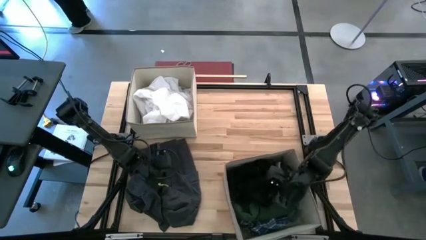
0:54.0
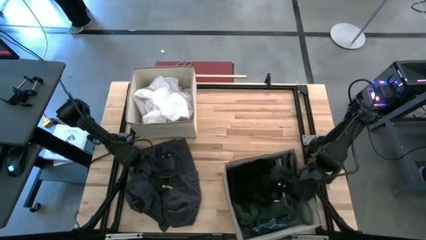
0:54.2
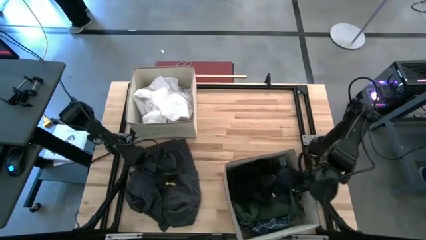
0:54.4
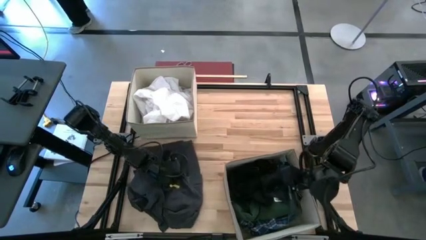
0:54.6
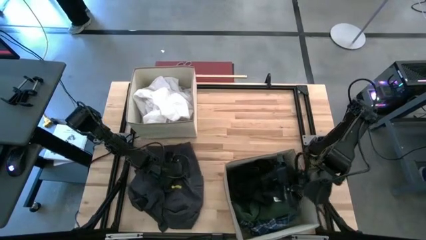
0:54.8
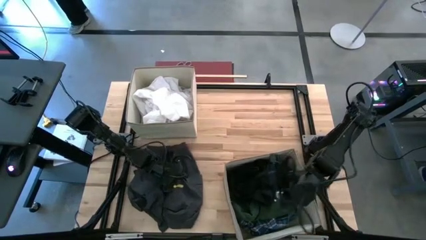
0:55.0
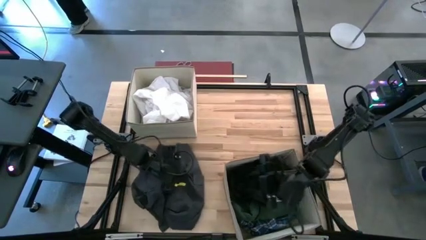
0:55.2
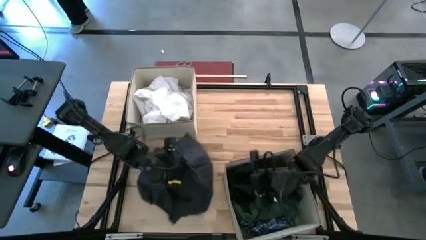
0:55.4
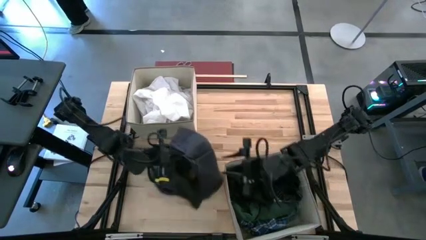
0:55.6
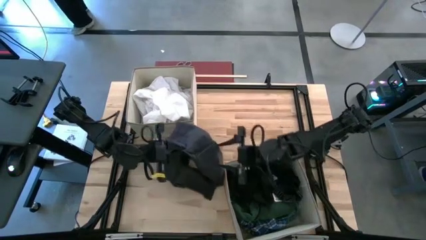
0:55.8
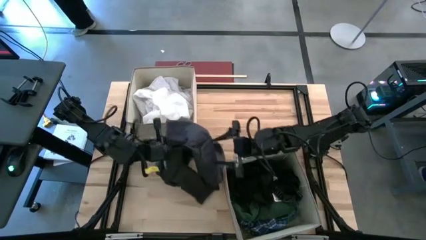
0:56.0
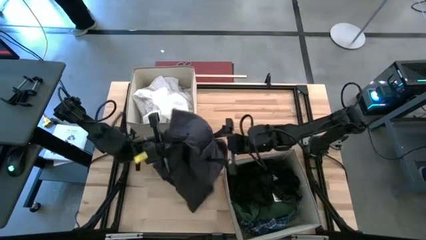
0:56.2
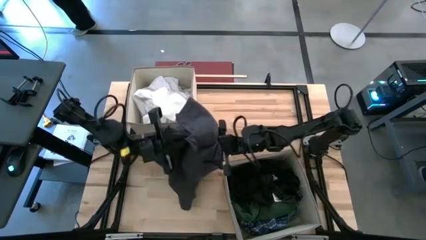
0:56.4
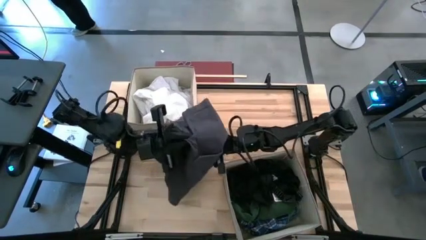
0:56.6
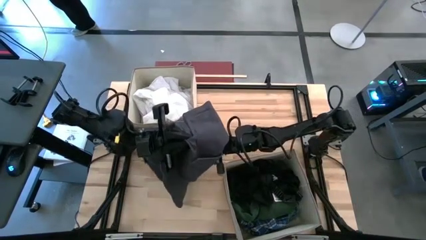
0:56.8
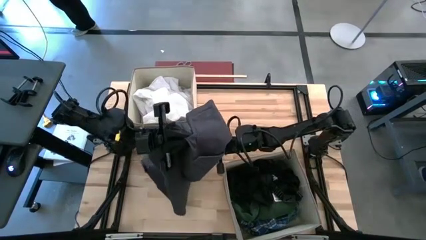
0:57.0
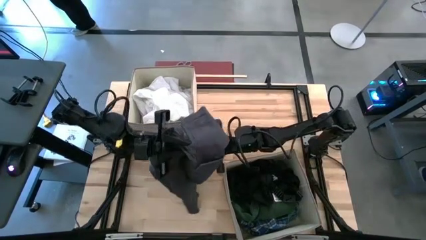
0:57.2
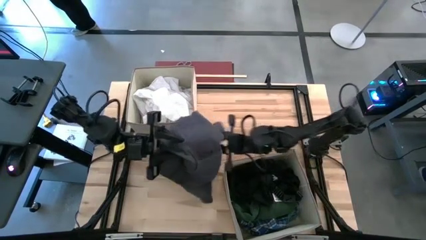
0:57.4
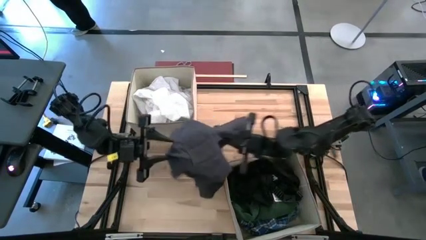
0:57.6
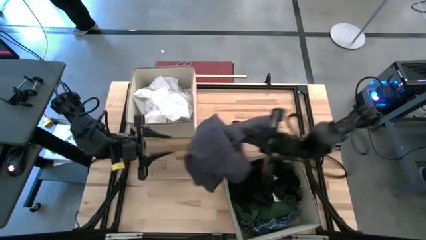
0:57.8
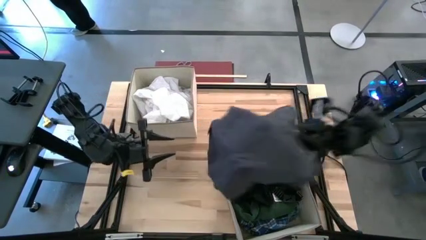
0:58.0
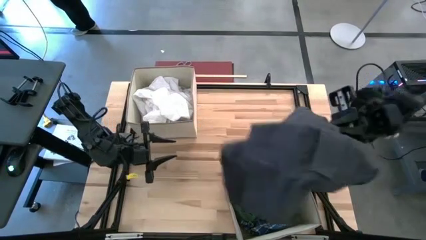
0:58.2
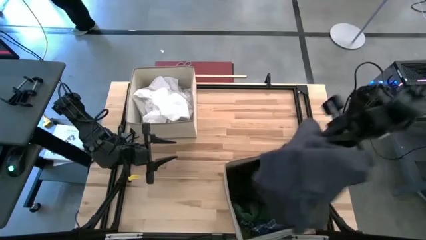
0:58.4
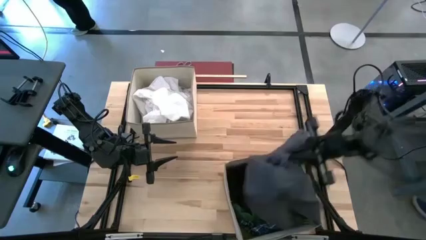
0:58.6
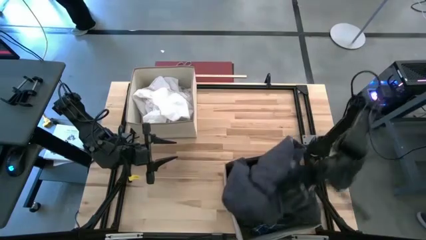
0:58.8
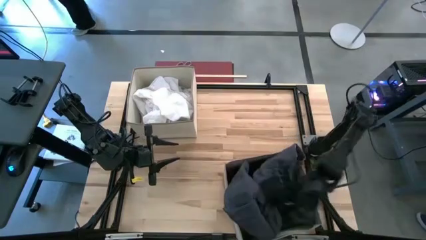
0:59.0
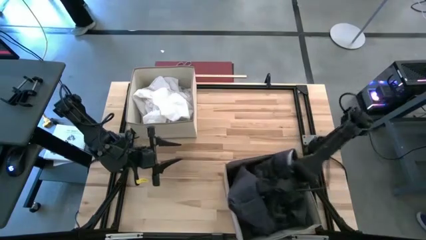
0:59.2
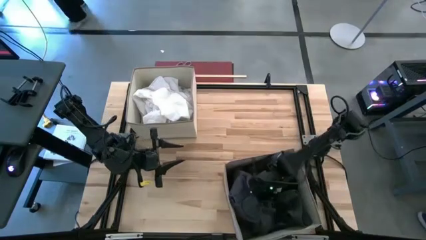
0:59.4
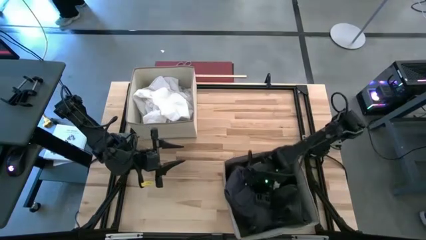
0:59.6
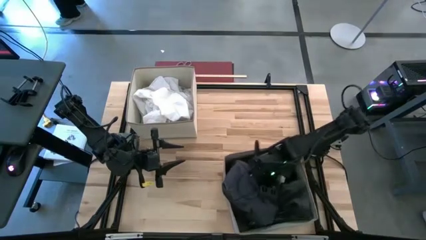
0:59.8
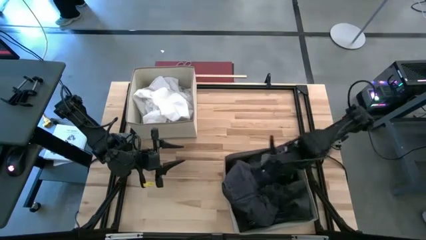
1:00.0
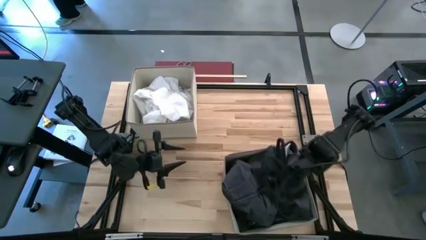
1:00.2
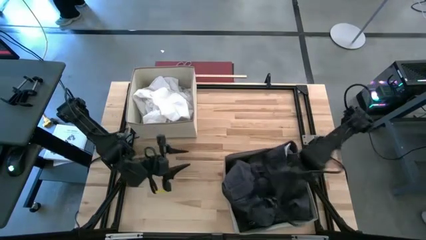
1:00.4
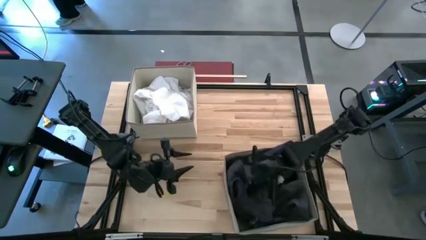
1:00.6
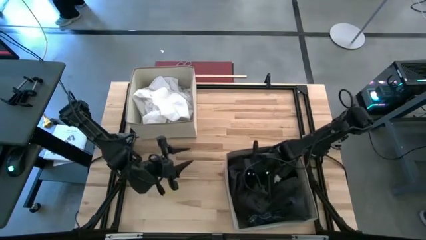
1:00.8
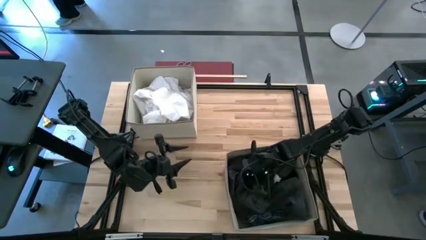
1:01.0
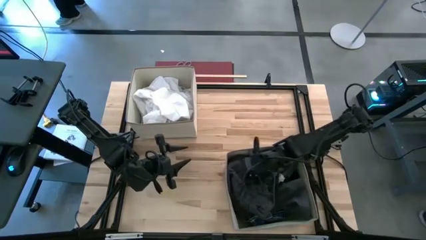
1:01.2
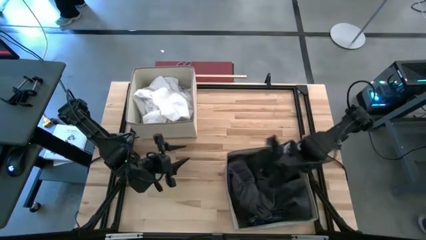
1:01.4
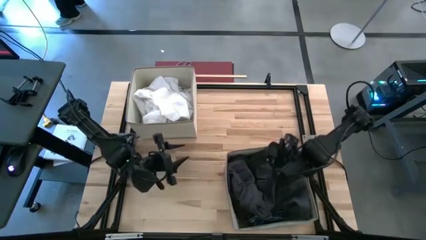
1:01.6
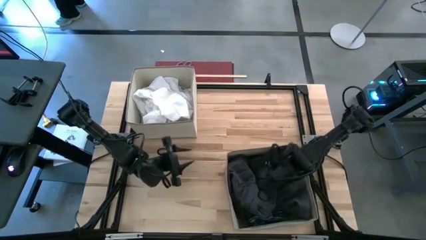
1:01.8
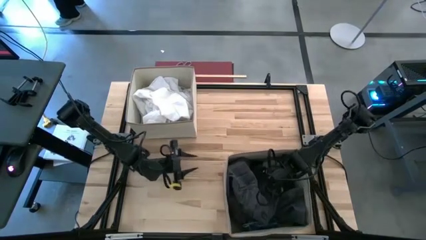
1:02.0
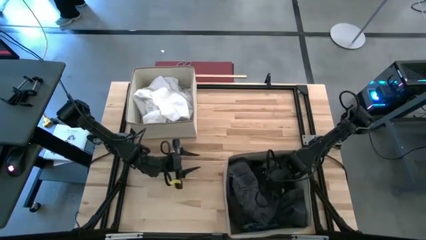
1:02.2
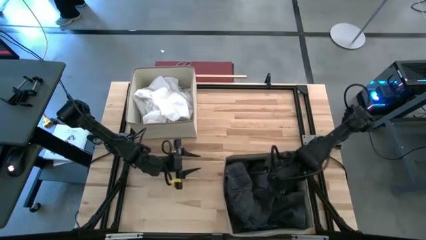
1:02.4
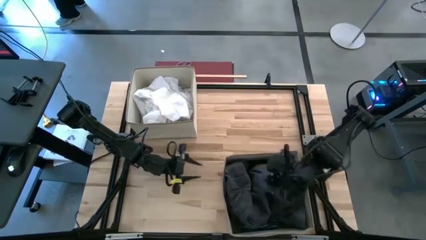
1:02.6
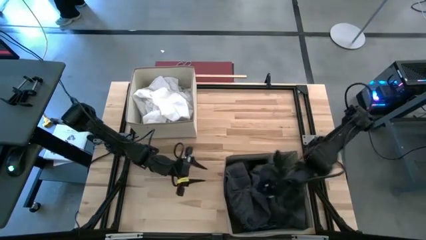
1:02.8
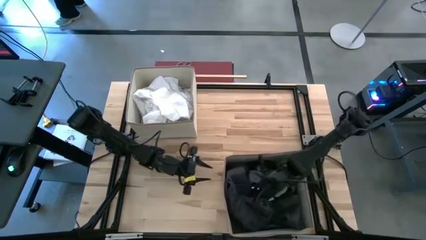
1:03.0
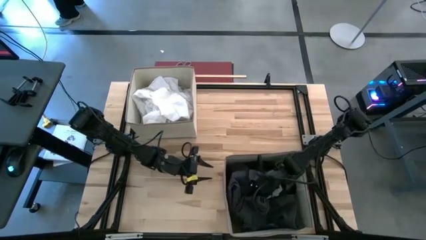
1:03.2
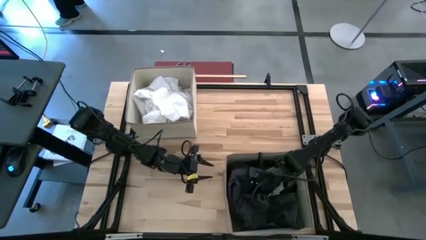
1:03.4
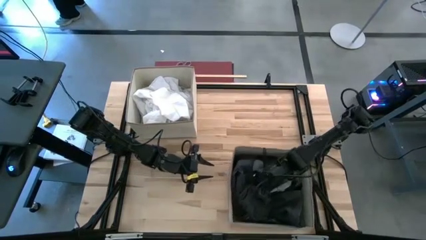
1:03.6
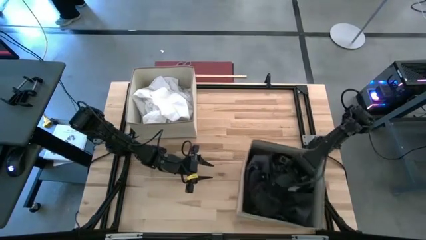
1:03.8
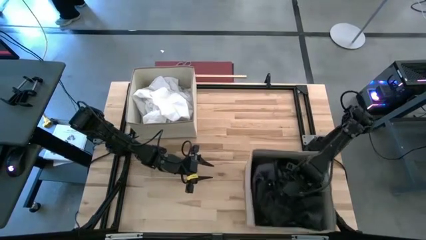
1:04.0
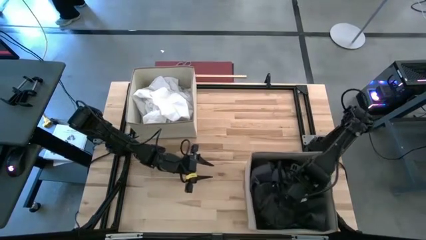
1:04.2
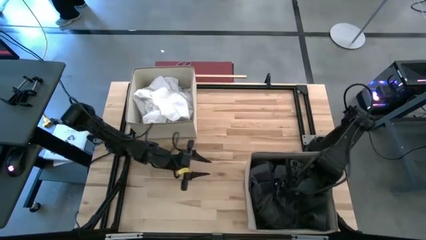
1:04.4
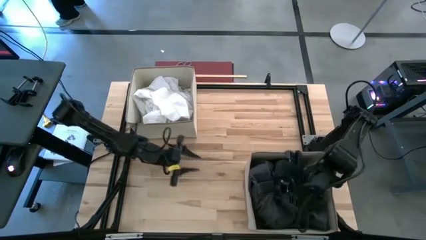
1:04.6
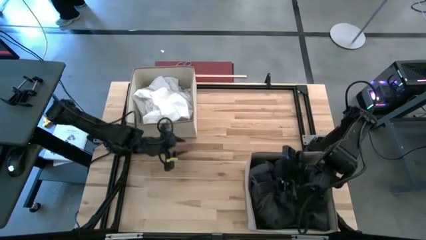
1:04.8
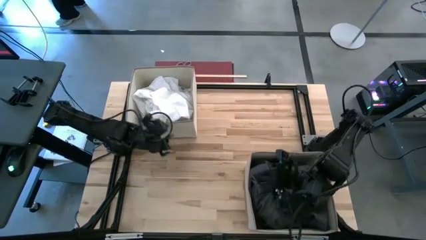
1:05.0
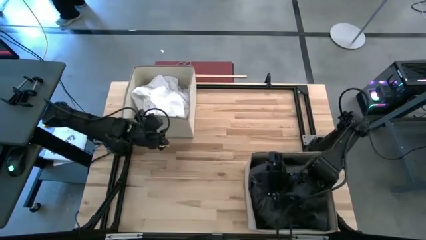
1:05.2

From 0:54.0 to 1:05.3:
Task: Sort clothes
Put the black pants into the bottom laundry bin

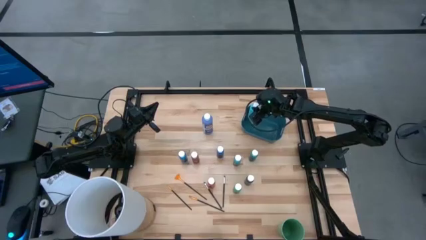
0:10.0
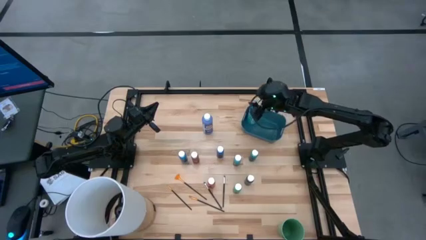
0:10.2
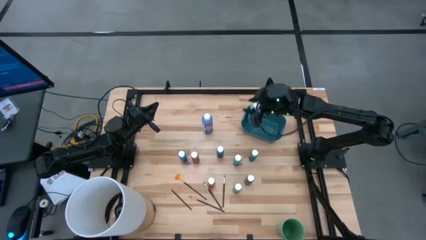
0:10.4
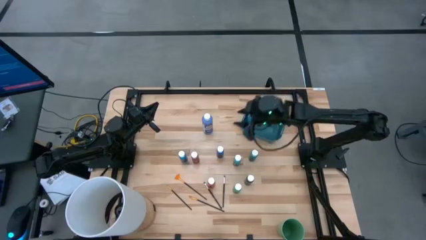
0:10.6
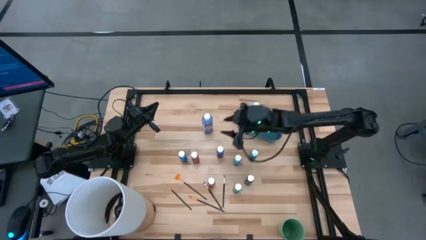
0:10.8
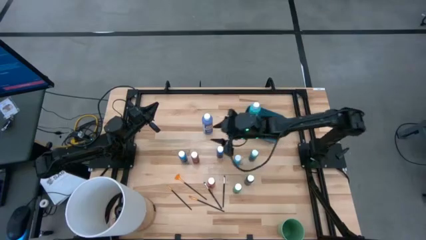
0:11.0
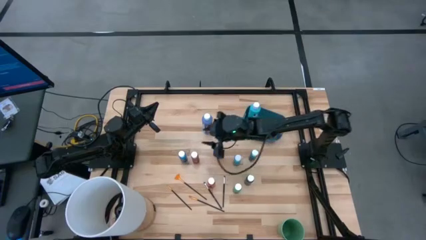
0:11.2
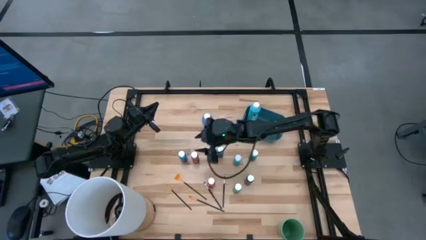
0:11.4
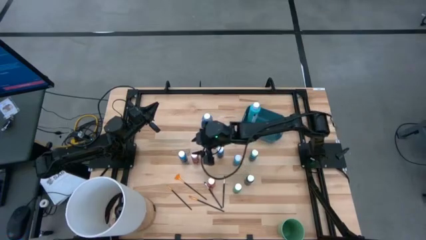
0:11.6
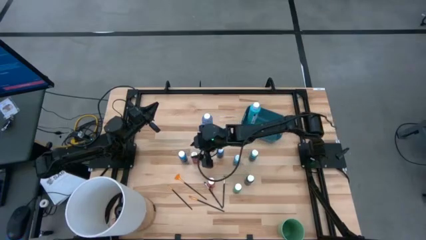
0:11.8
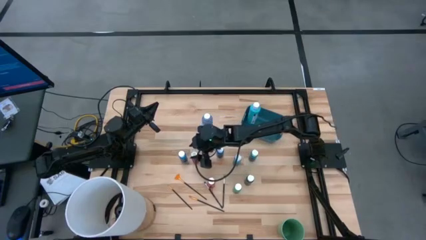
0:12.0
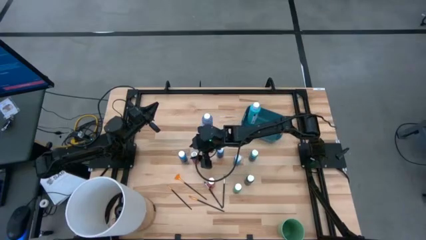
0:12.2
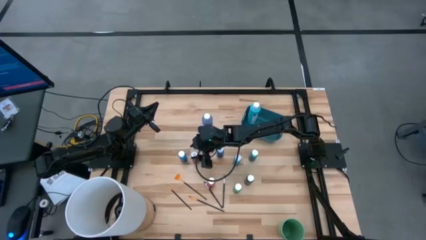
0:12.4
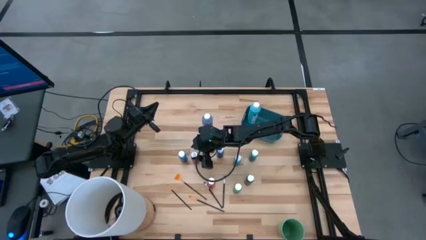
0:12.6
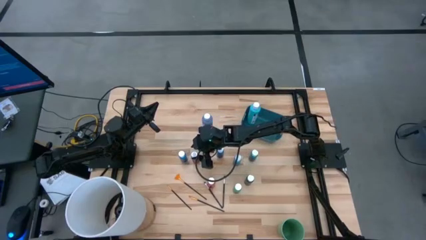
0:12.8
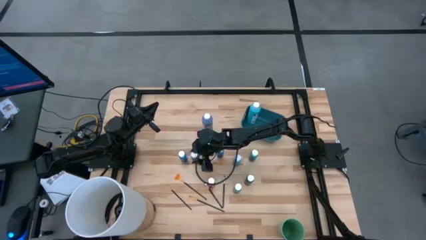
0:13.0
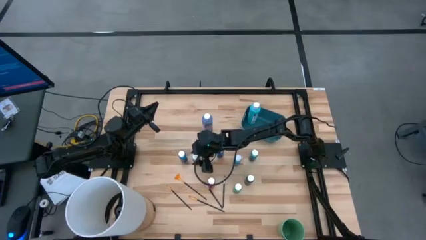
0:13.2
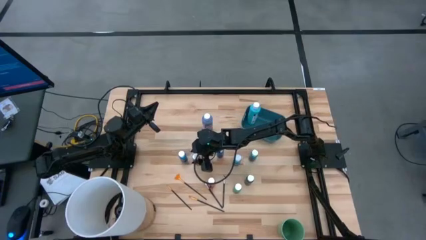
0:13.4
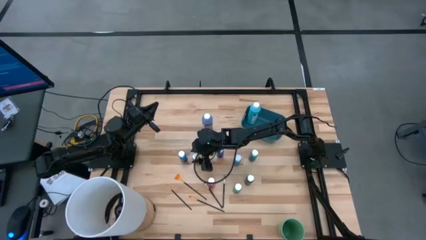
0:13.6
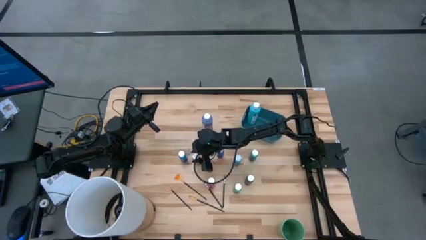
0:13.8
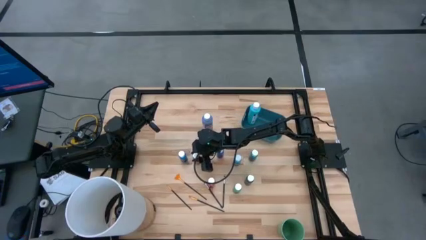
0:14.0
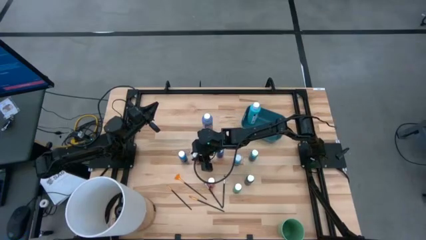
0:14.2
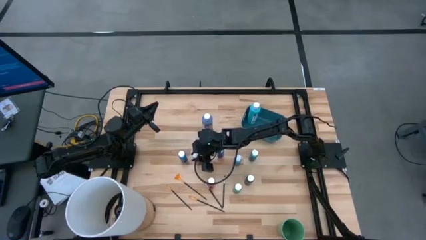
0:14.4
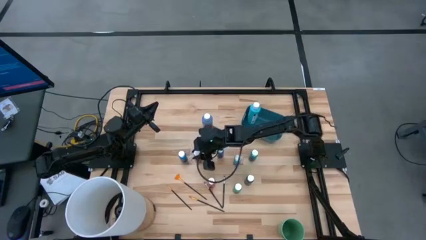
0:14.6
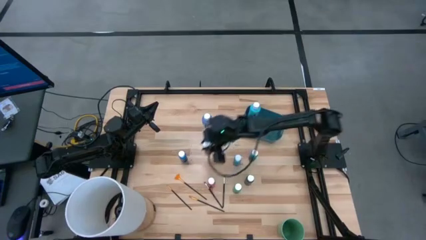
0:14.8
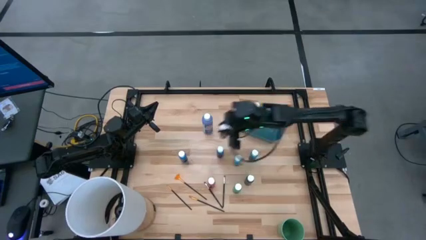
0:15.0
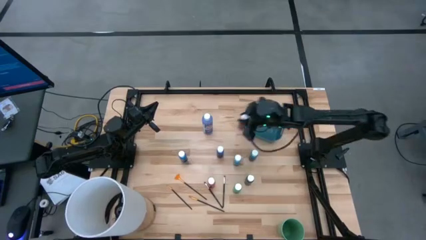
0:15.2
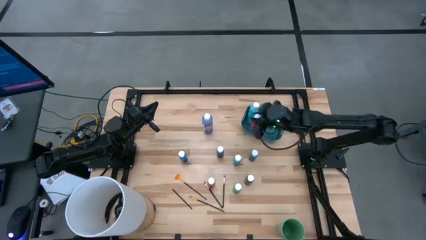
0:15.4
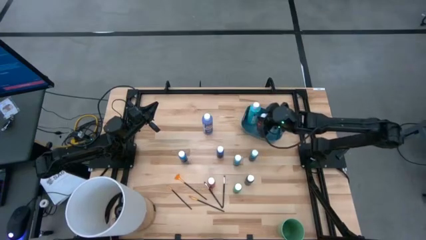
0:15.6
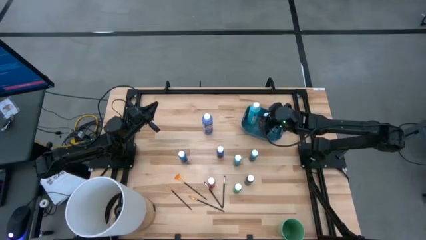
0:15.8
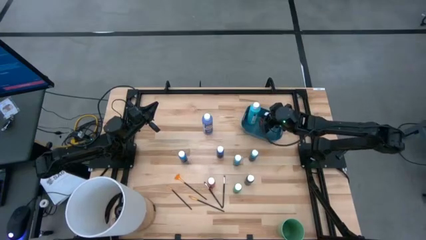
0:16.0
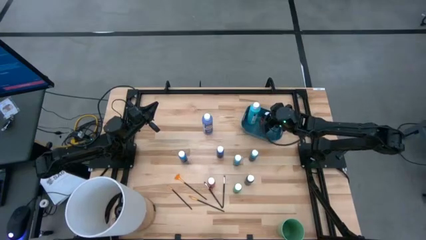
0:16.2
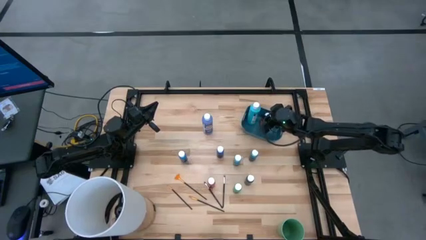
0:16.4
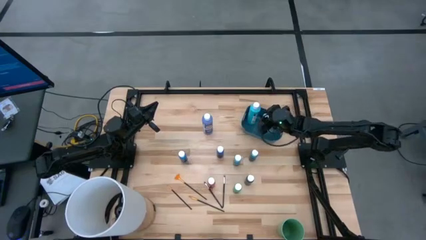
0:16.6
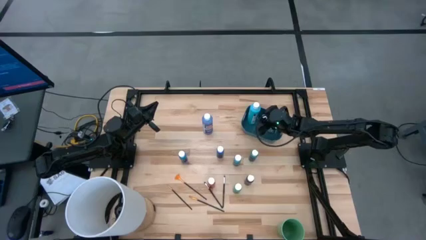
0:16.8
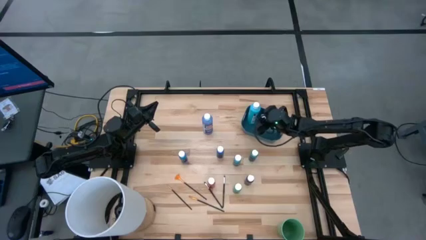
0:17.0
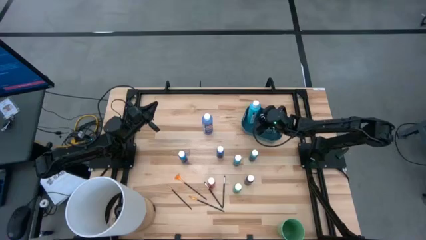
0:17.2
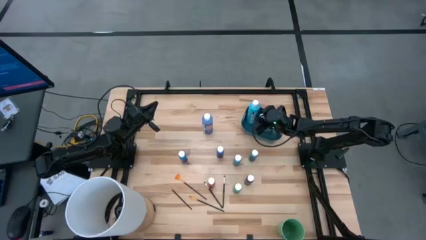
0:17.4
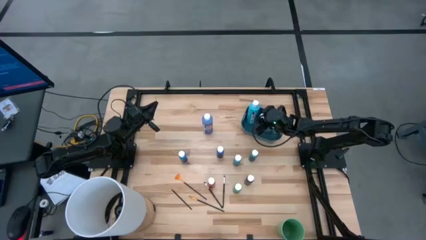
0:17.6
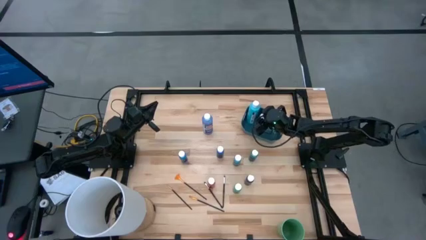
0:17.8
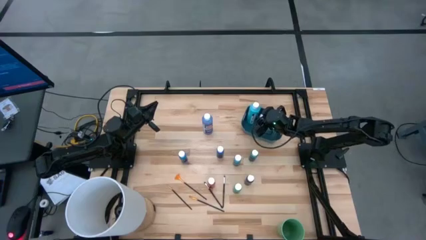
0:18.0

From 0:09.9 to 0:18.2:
Task: Pick & Place Paint Supplies
Put the small red paint bottle into the blue bin
